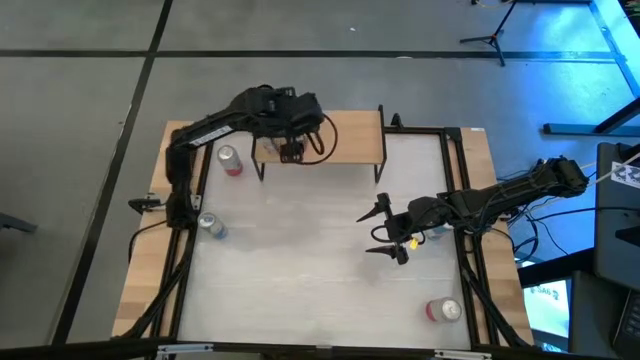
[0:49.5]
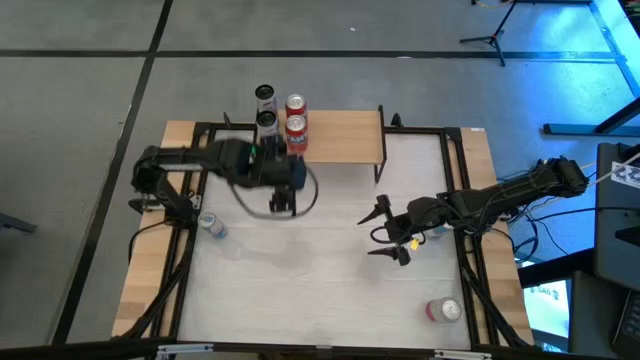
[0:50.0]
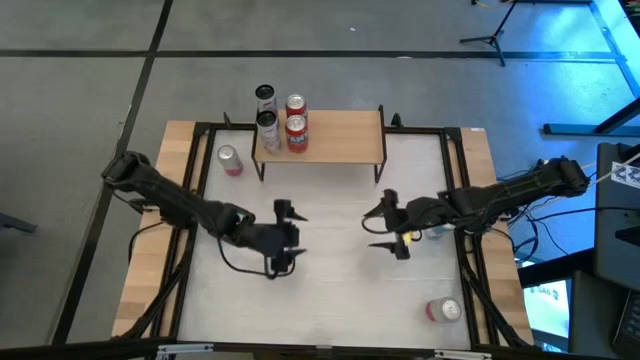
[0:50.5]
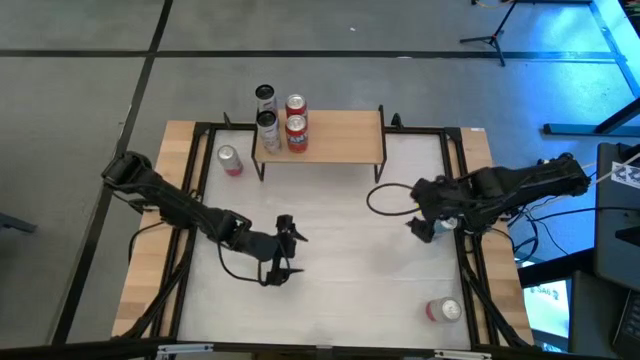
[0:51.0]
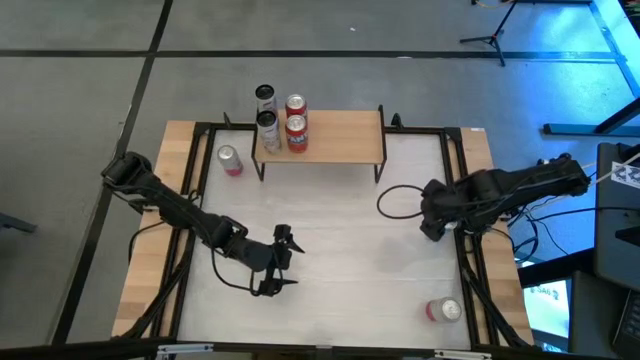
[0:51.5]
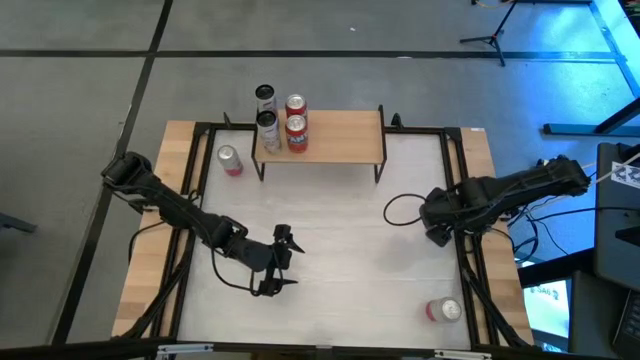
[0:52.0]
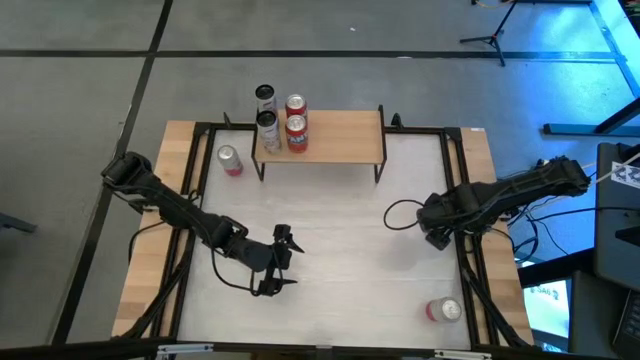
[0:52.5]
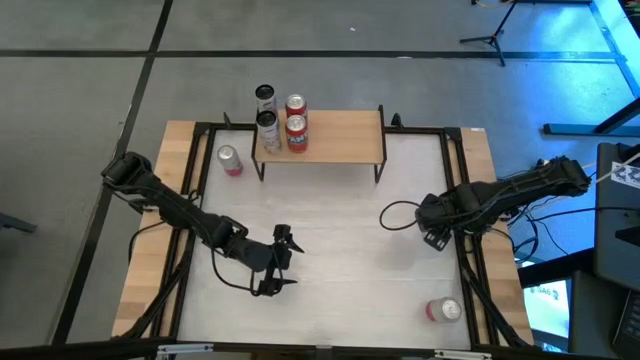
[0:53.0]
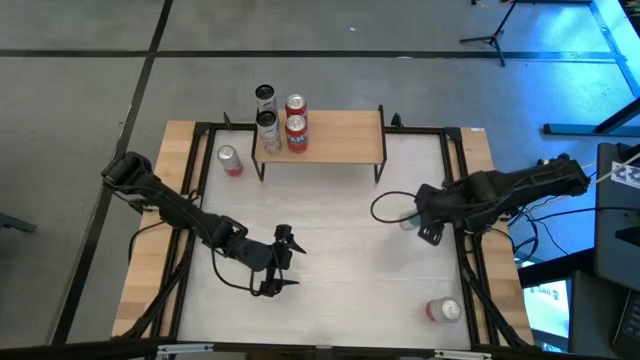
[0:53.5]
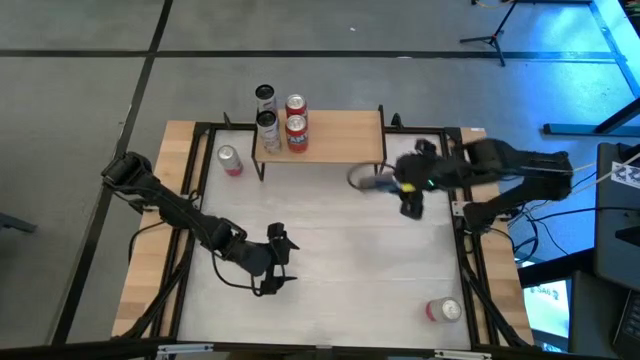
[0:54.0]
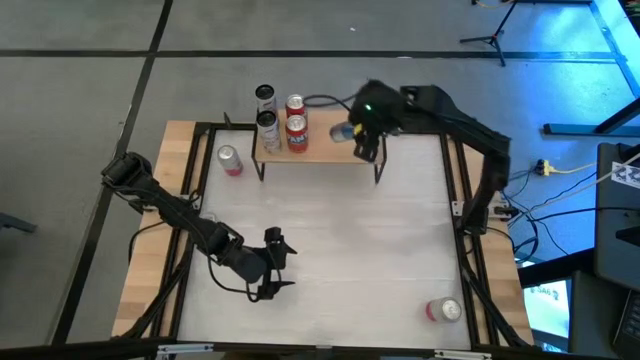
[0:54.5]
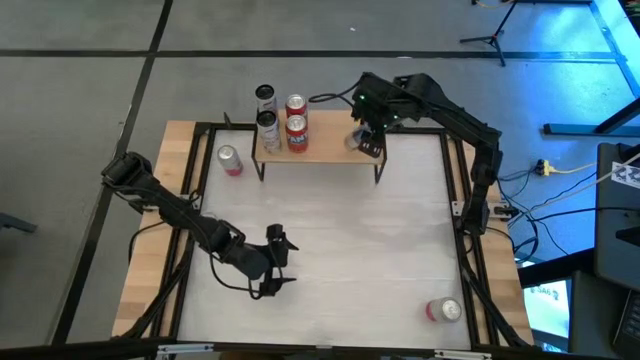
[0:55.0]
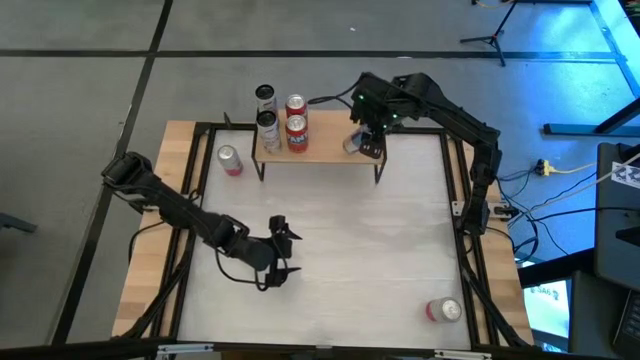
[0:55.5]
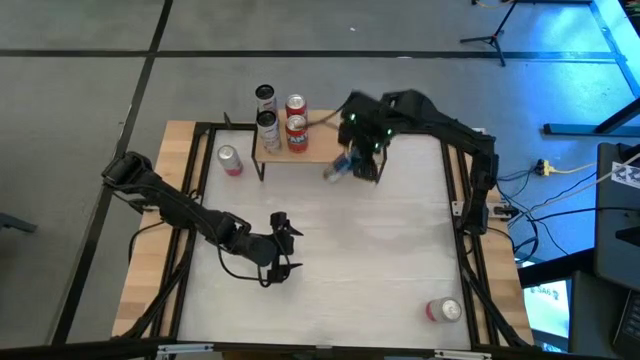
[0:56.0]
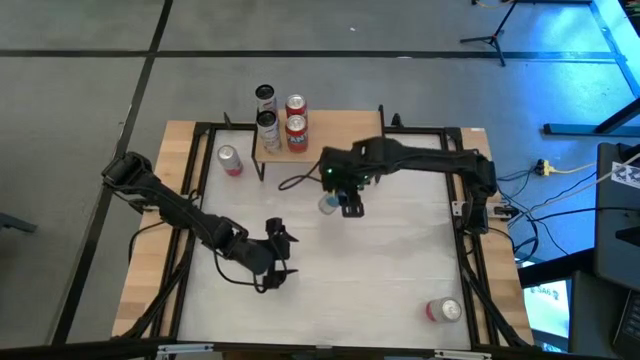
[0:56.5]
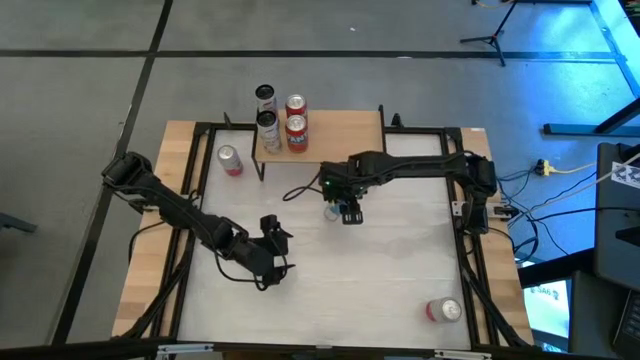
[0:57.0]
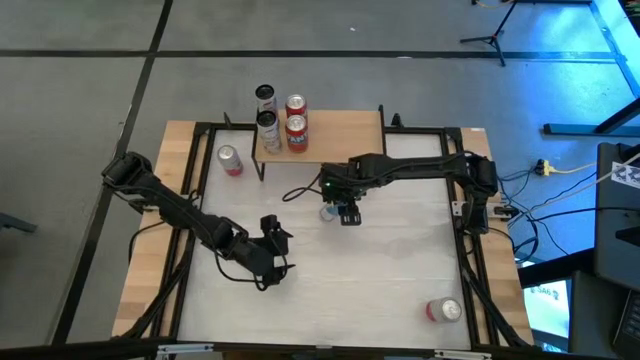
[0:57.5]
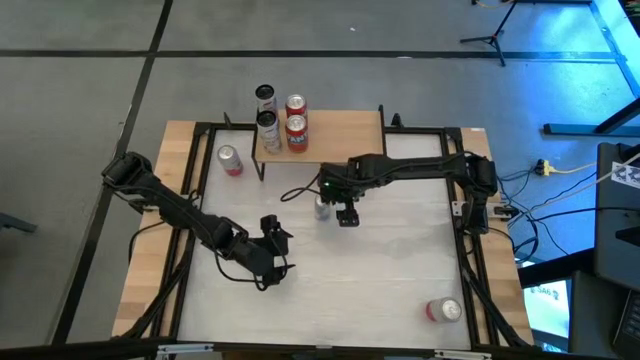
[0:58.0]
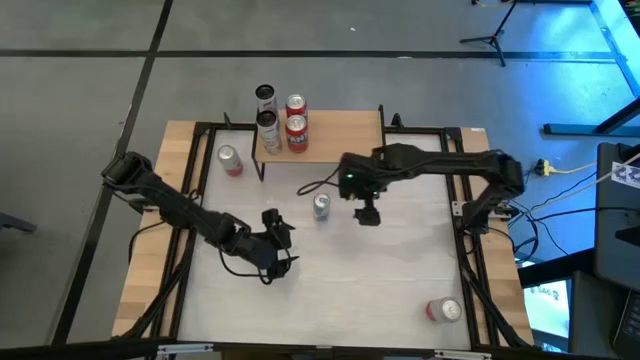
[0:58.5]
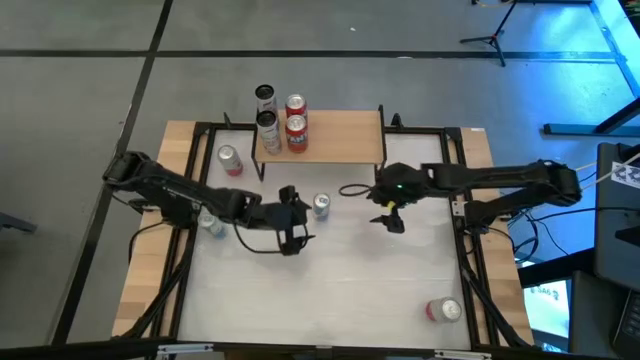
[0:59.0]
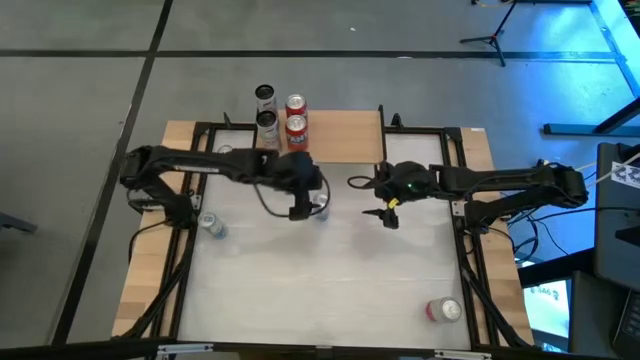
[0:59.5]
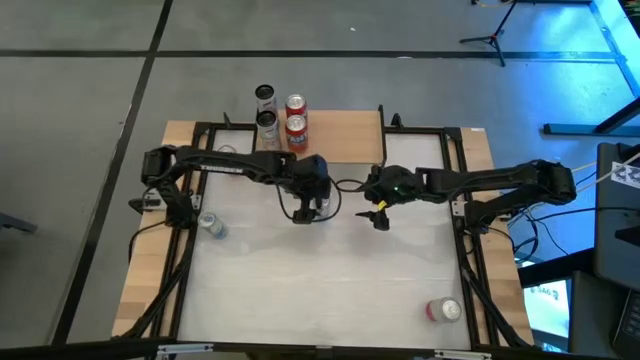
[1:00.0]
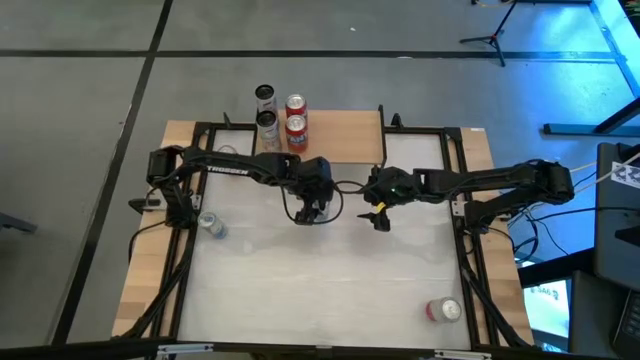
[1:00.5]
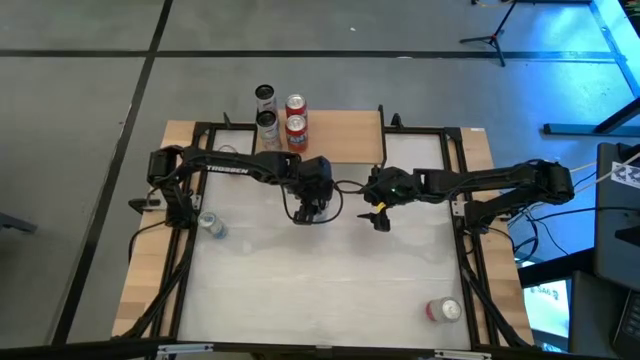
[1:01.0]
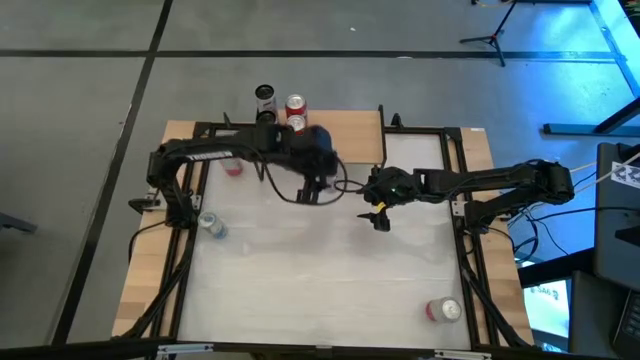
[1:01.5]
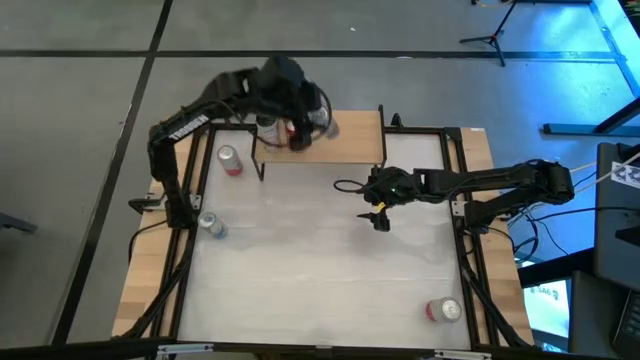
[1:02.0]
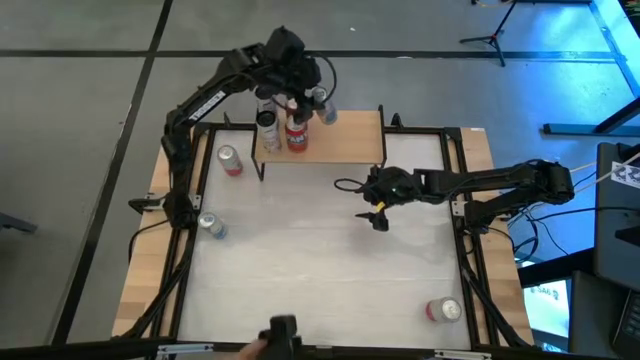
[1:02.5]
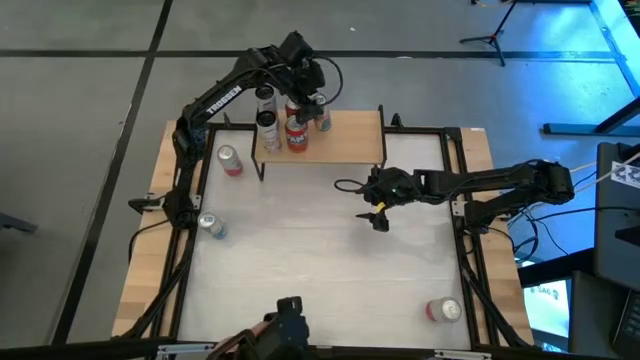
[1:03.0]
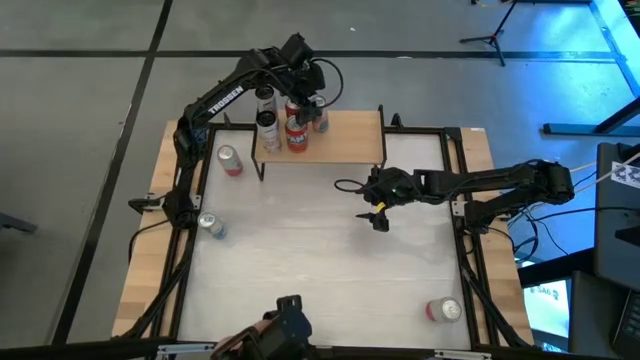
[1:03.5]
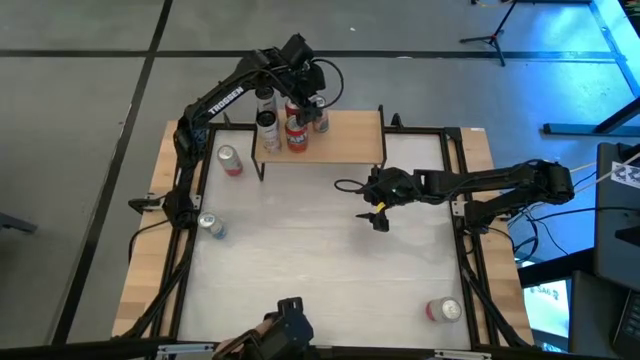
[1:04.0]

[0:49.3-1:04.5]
Task: Place canned beverage on shelf
Put the right blue soda can on the shelf

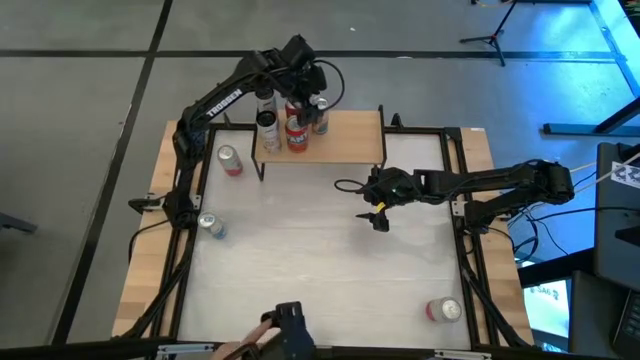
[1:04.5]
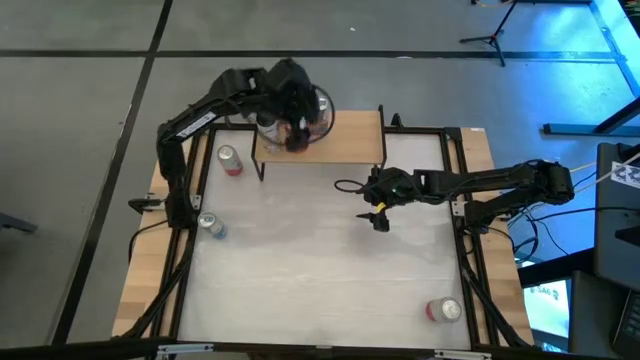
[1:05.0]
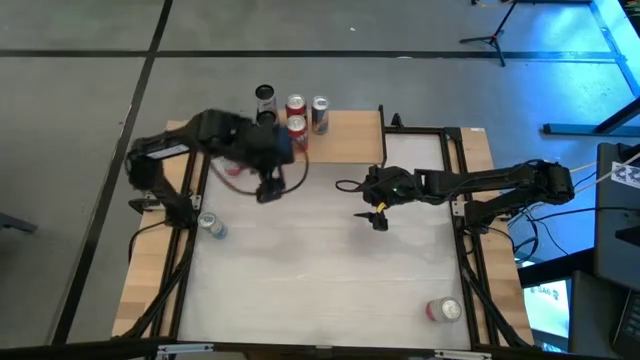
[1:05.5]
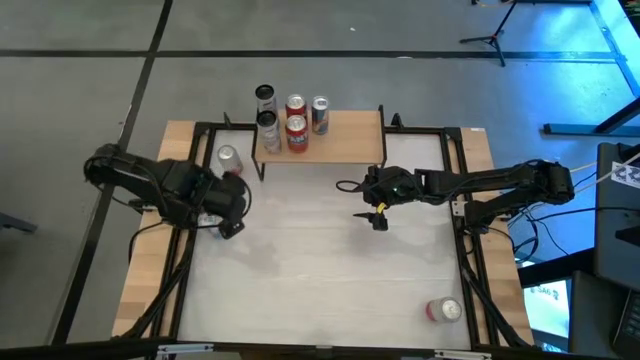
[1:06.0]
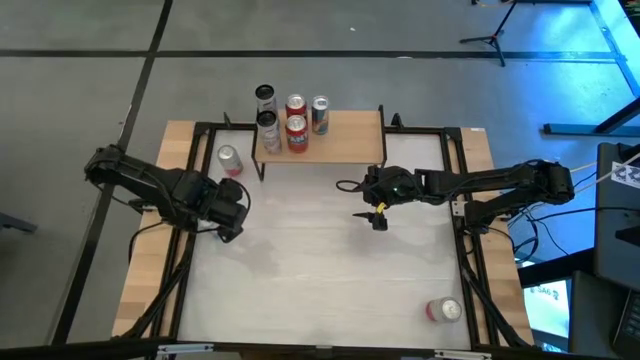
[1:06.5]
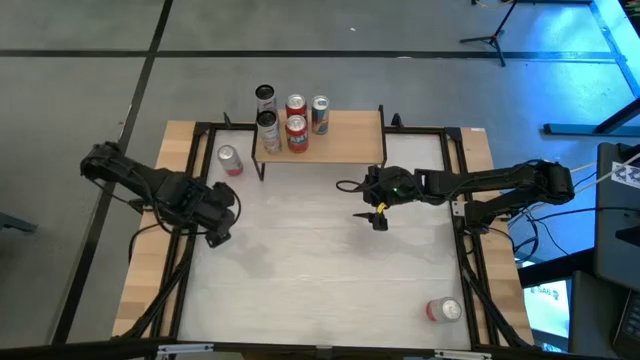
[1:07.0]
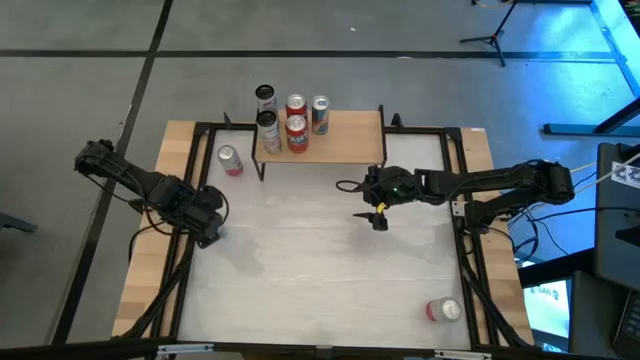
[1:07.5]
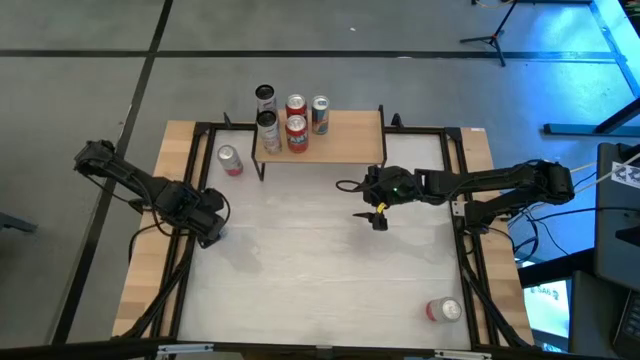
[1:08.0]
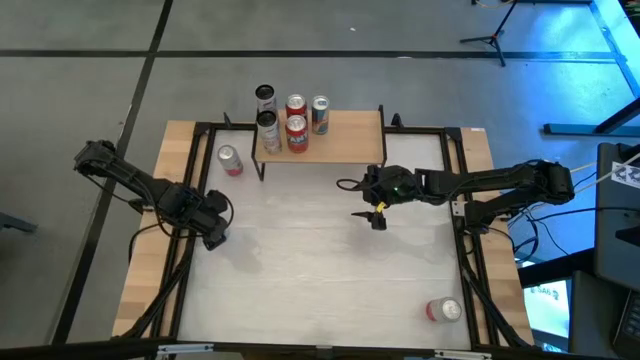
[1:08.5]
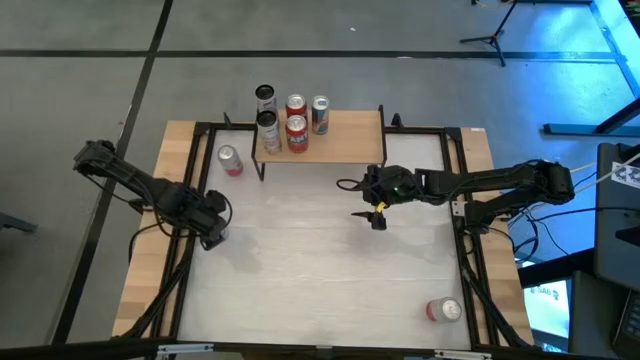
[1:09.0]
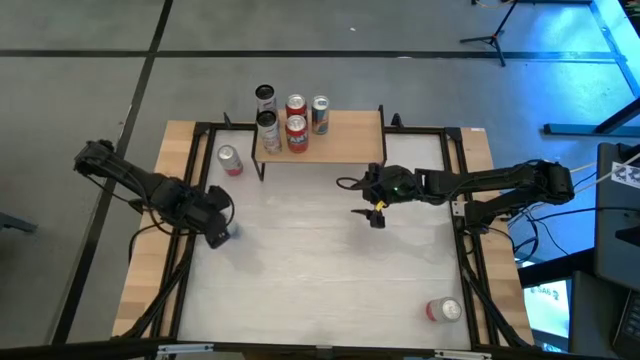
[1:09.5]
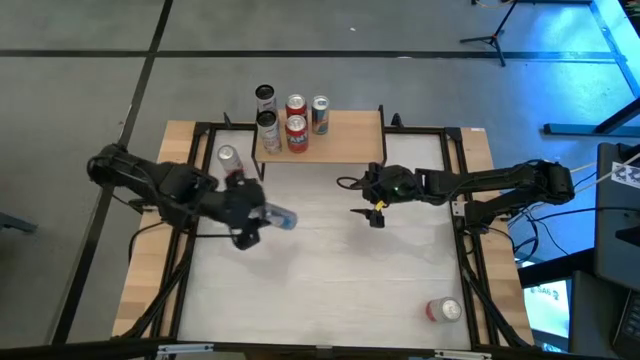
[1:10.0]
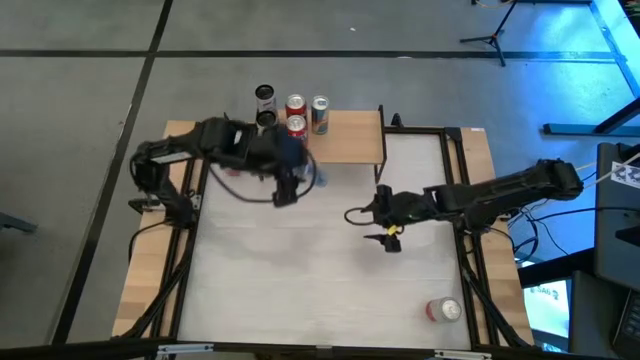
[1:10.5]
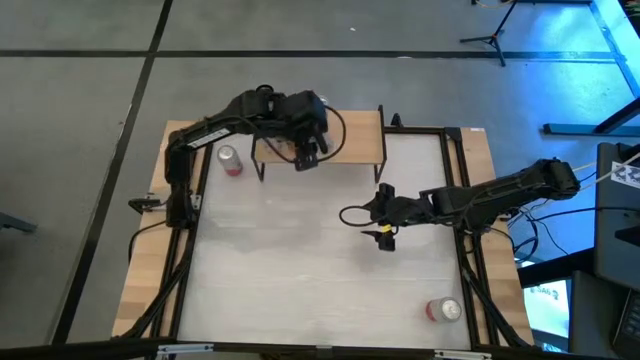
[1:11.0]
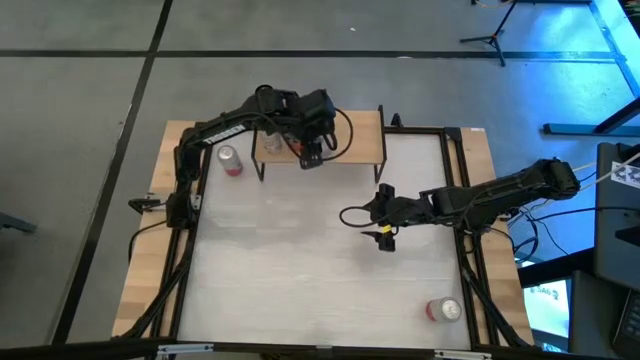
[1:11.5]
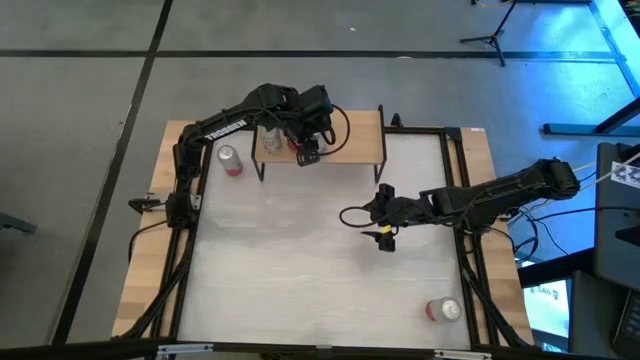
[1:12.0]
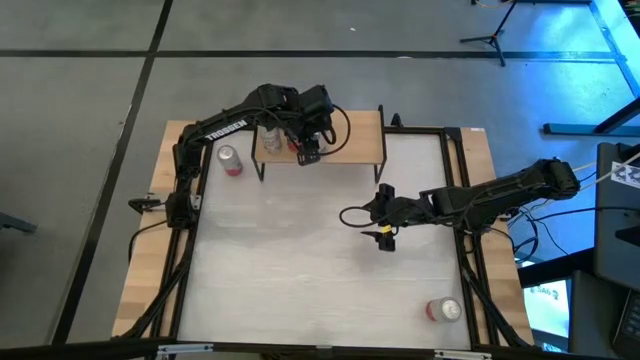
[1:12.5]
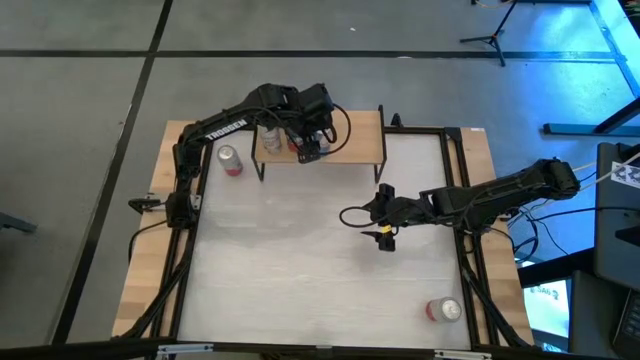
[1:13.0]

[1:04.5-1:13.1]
Put the blue soda can on the shelf
